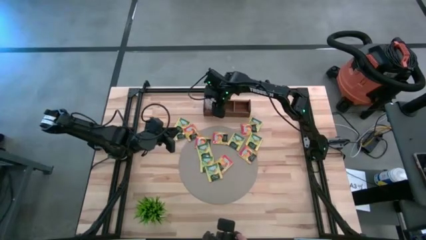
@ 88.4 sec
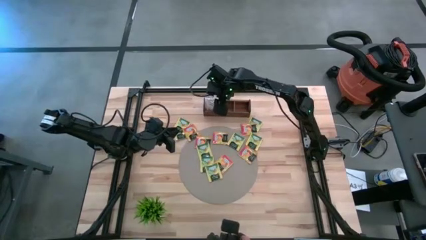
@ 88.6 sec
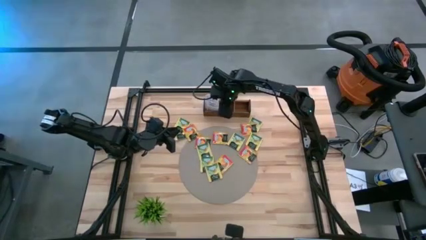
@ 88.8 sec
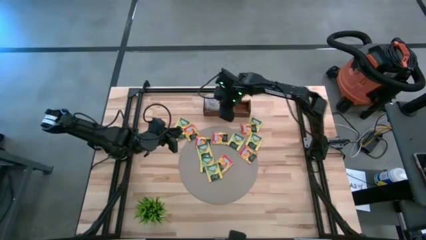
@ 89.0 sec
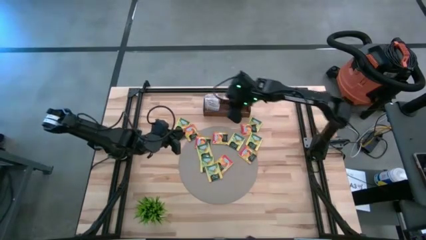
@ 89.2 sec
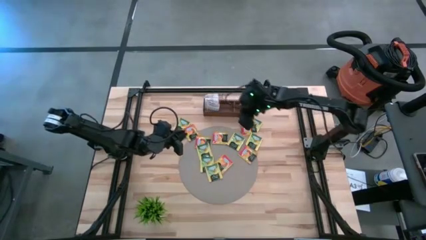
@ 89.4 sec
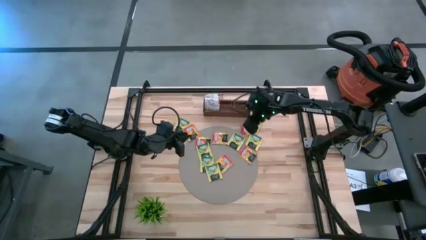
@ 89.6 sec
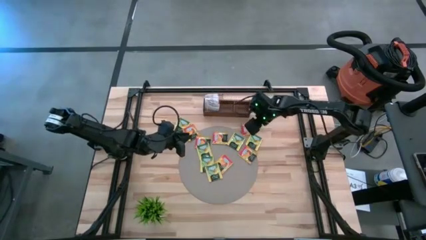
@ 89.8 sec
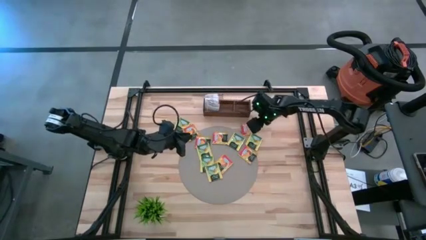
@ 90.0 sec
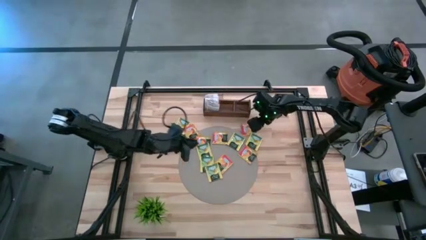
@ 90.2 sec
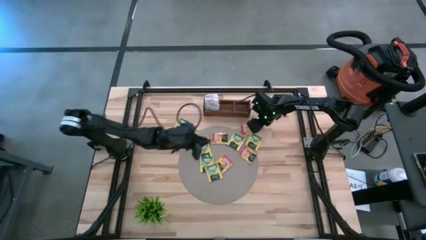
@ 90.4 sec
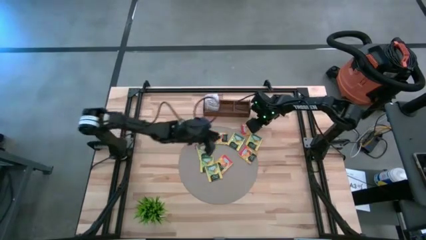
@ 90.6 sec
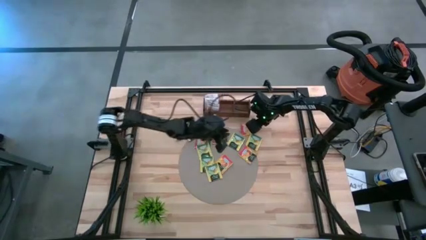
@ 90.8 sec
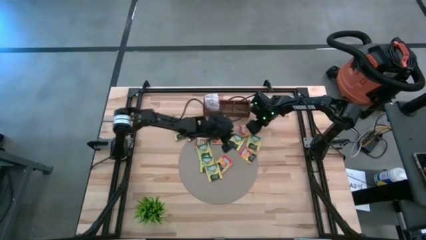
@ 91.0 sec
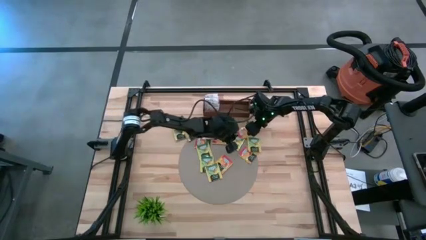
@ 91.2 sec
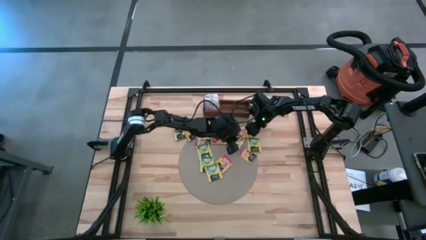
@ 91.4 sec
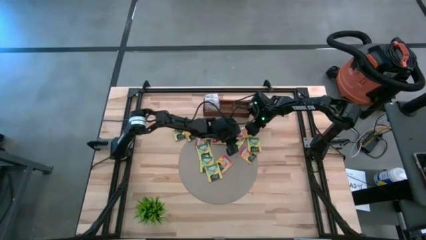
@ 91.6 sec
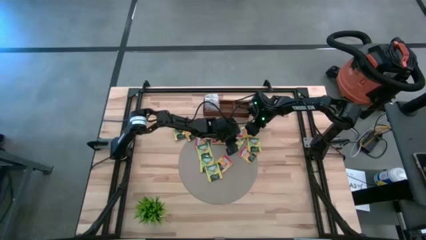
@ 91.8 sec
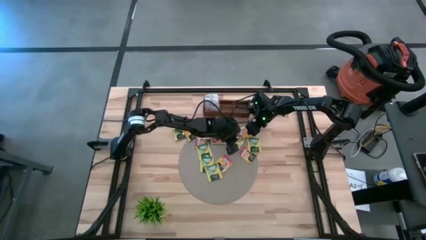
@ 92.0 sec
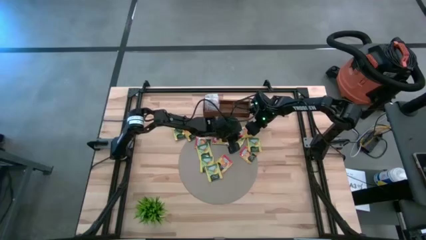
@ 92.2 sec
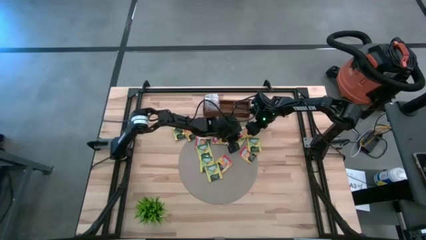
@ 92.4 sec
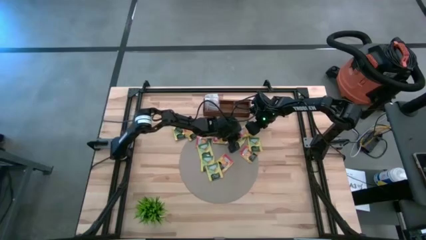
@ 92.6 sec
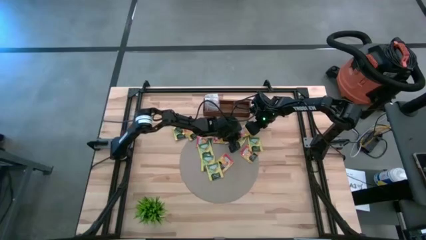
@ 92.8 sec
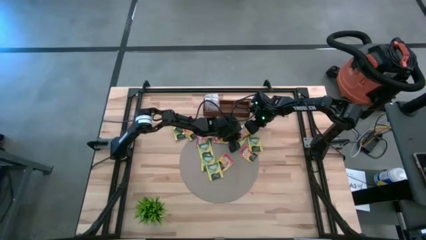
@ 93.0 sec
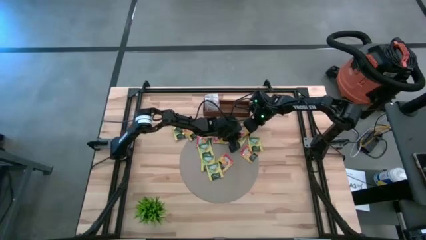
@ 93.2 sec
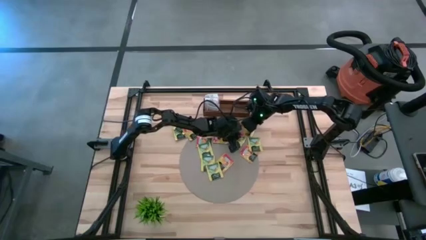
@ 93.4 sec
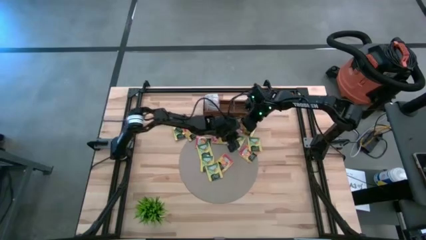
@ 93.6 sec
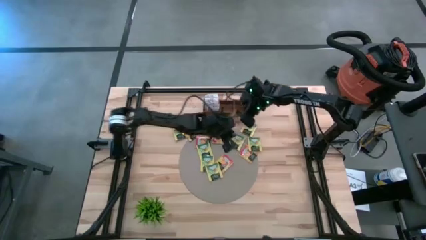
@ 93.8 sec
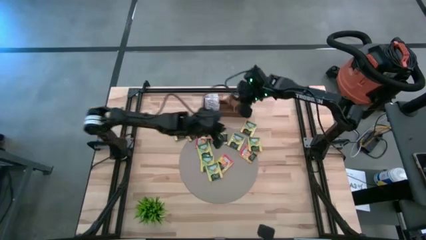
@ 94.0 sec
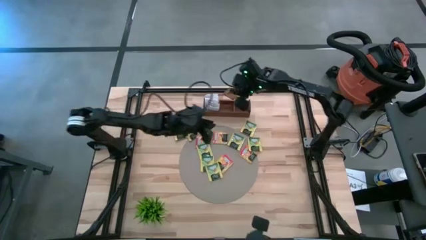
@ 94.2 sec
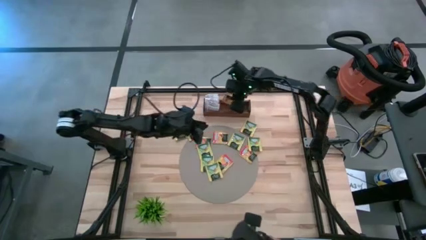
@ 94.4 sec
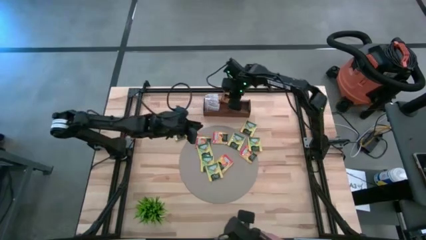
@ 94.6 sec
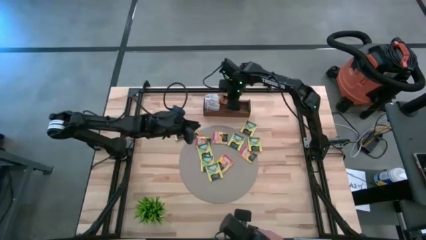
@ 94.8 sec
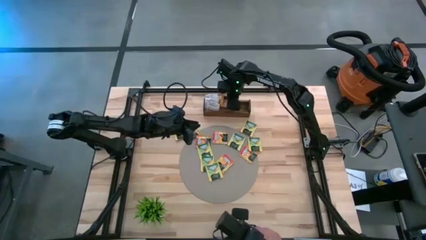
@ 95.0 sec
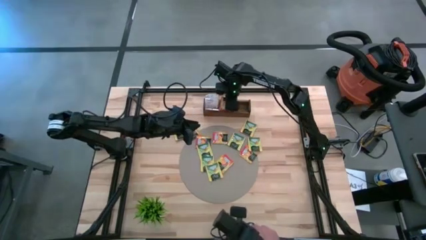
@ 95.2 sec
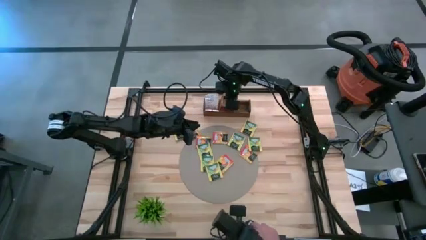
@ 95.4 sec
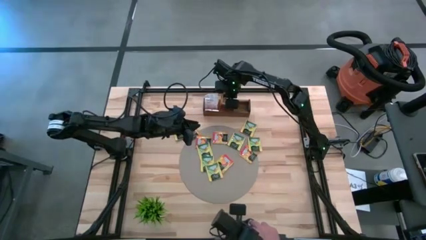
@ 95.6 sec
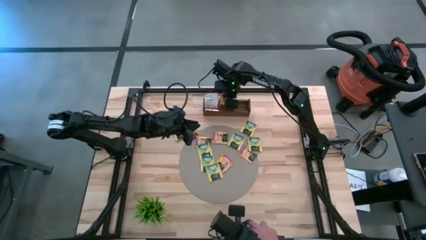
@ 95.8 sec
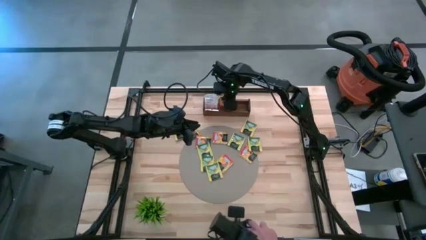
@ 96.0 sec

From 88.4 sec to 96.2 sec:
Task: Pick & Place Tea
Put the orange tea bag into the middle section of the wooden organizer

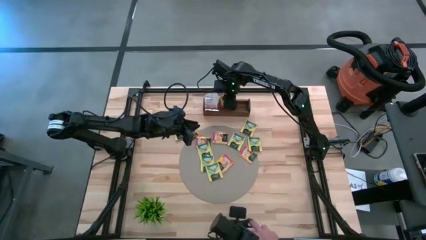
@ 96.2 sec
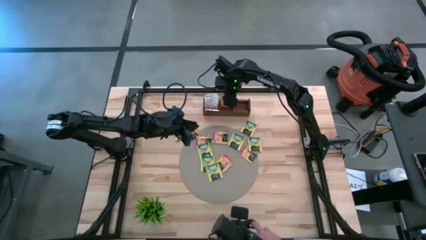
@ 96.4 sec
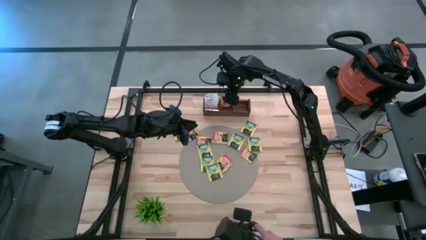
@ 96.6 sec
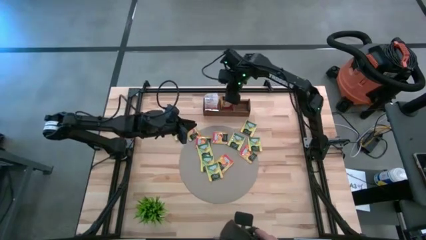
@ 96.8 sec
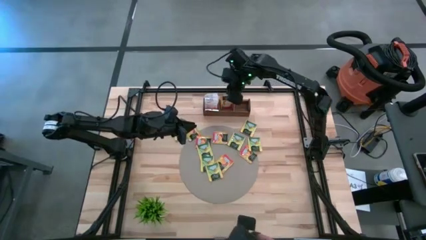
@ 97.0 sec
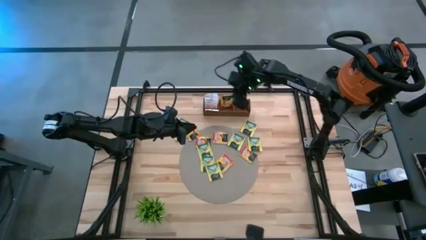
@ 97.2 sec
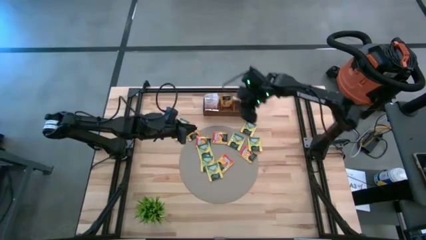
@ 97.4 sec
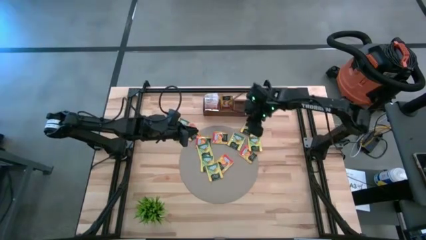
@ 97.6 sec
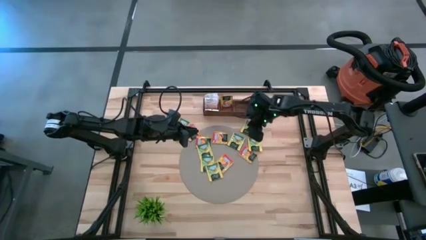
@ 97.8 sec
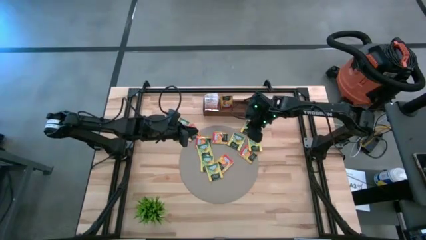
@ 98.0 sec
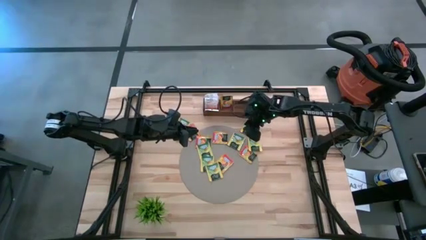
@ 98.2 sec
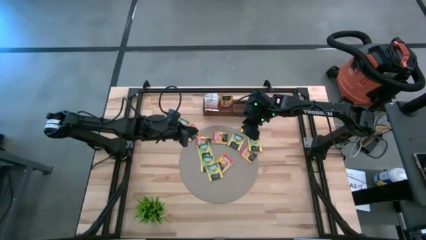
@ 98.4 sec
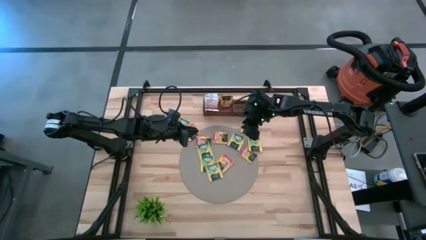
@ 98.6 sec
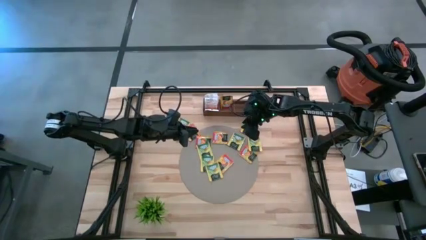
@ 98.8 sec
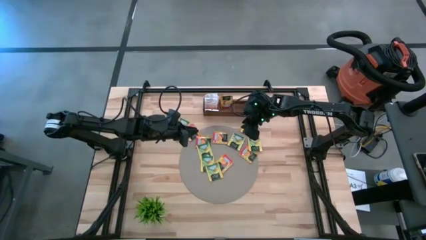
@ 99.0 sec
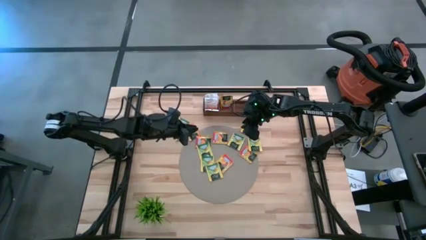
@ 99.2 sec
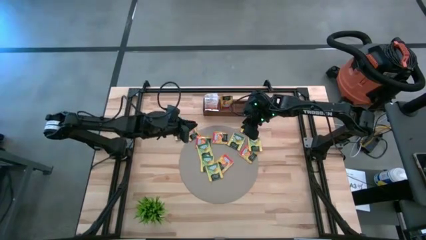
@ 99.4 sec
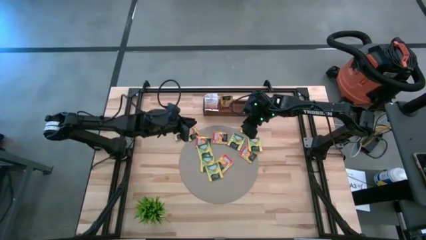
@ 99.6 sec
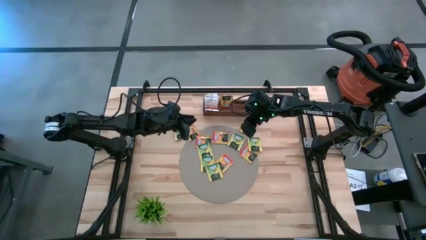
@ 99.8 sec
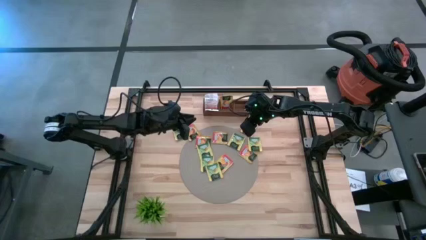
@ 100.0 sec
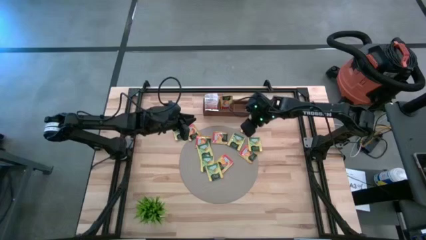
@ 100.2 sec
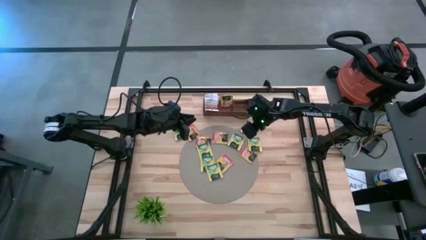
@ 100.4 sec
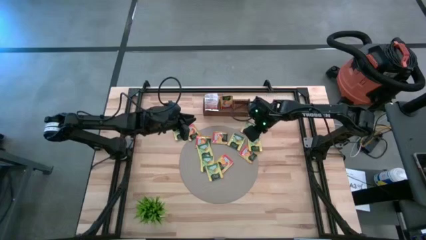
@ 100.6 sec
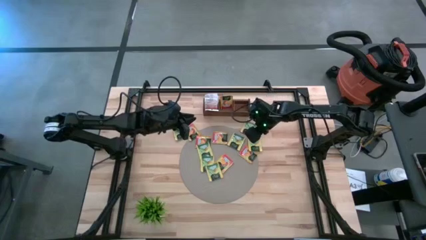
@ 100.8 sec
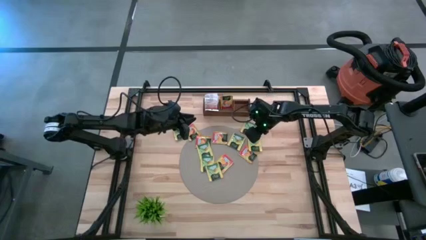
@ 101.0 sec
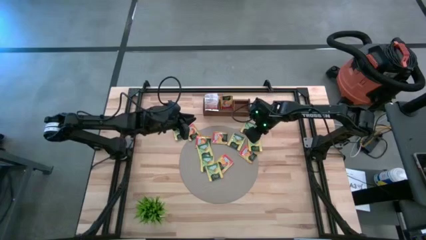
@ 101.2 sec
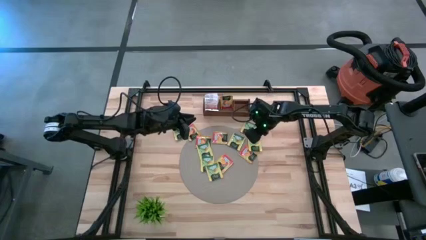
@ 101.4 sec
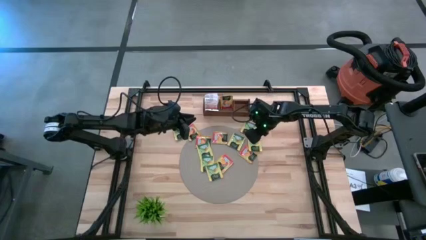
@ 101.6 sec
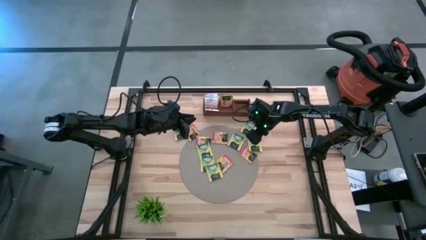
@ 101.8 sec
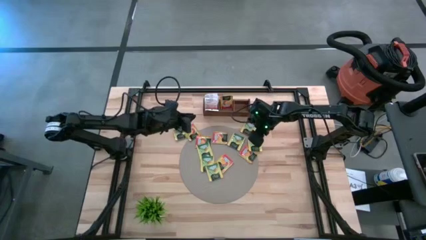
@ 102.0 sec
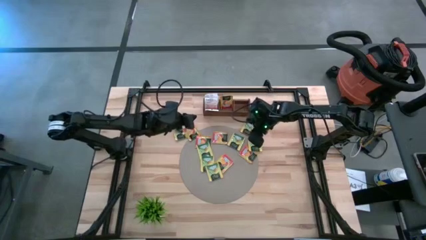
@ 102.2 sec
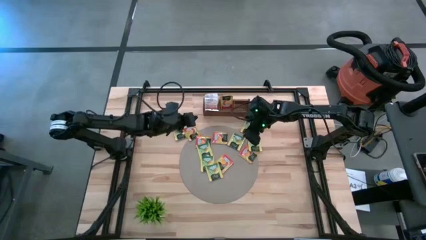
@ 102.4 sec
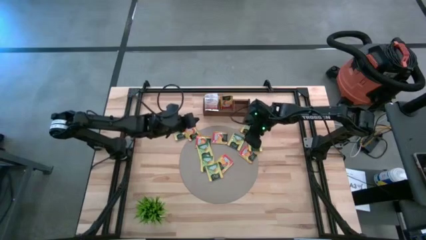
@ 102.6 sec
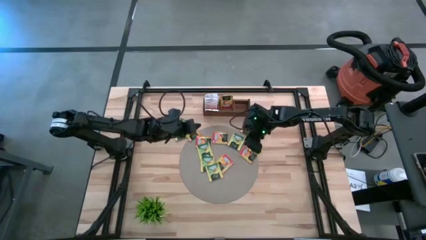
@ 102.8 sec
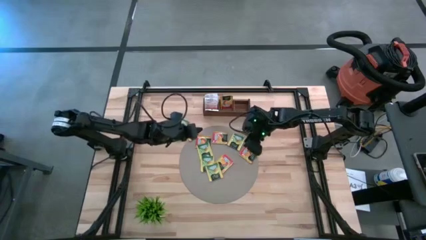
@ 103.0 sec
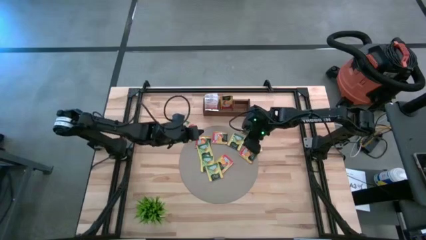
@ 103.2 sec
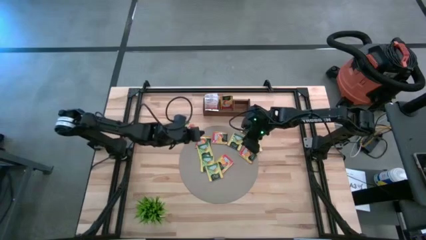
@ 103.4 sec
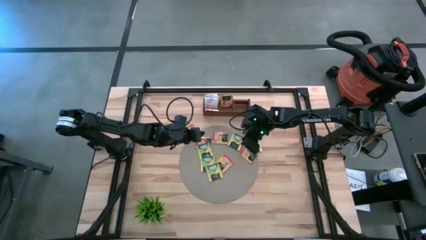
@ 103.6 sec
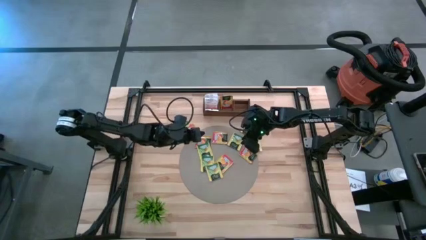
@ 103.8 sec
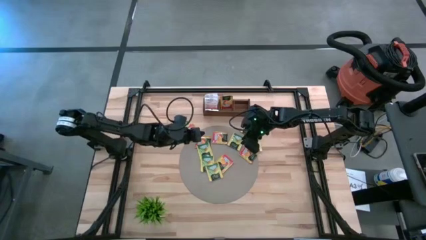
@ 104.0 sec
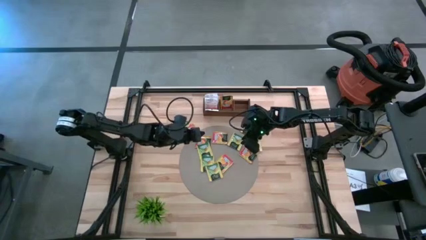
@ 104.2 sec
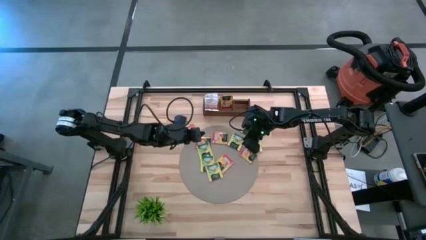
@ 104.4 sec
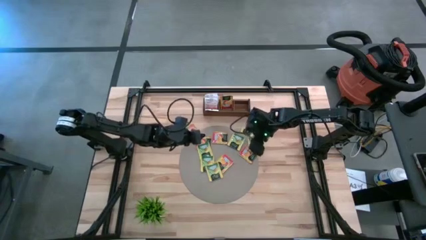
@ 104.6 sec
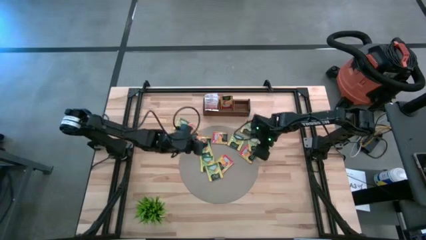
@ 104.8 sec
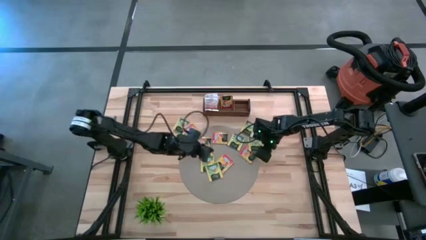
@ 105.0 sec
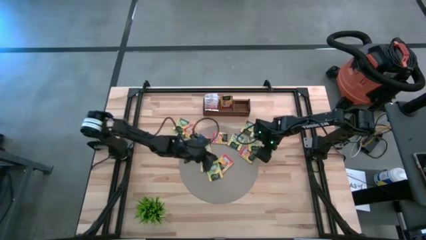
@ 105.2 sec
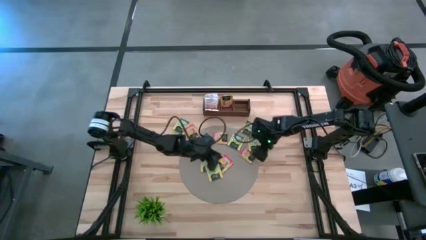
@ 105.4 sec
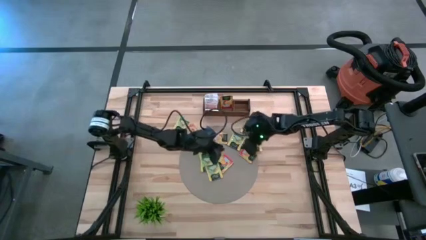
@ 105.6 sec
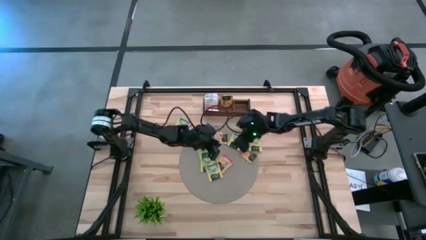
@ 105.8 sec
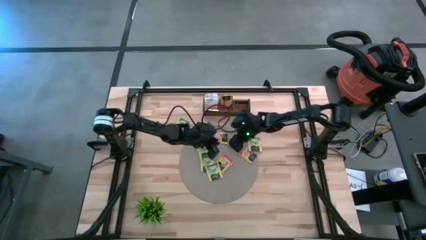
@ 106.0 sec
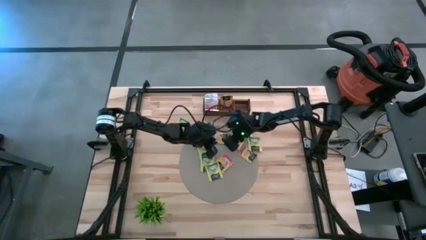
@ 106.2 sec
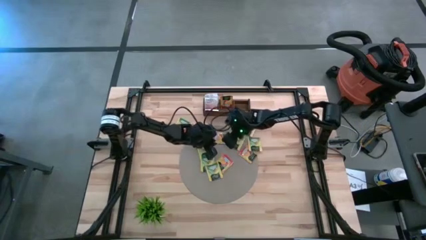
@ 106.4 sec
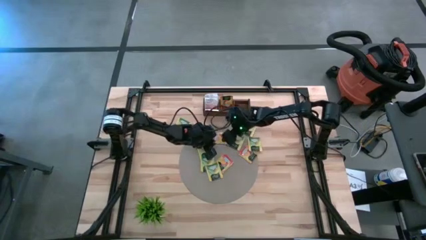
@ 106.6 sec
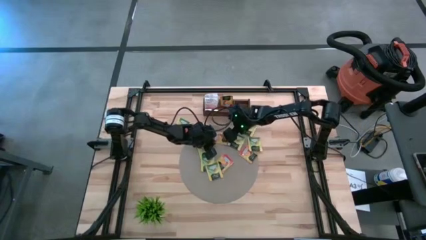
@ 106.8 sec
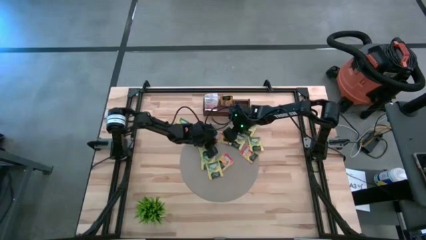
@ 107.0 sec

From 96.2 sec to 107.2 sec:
Put the orange tea bag into the middle section of the wooden organizer
